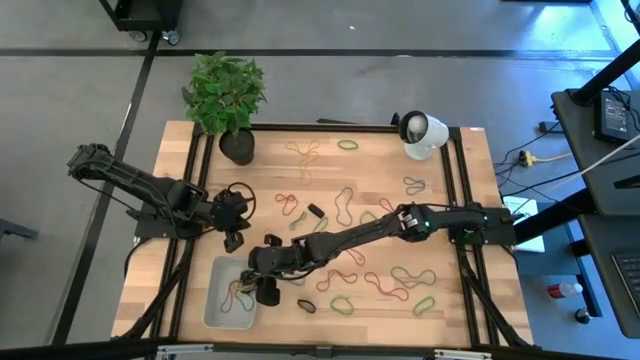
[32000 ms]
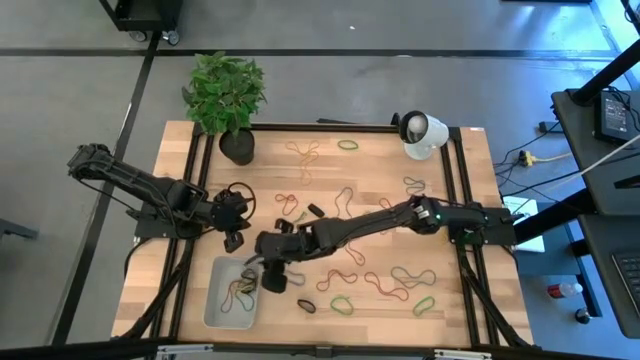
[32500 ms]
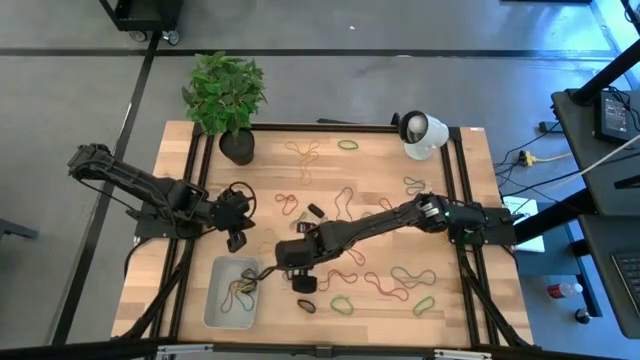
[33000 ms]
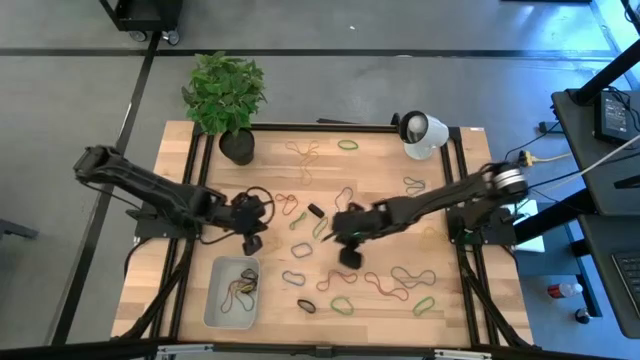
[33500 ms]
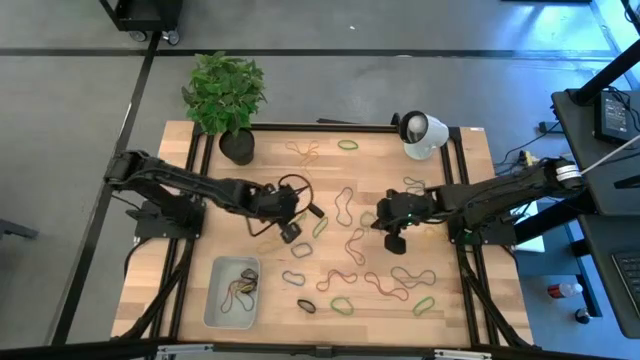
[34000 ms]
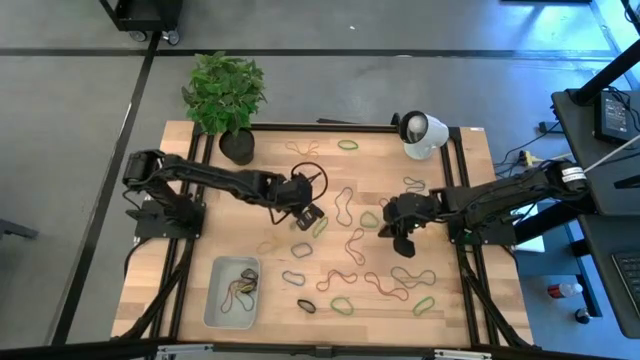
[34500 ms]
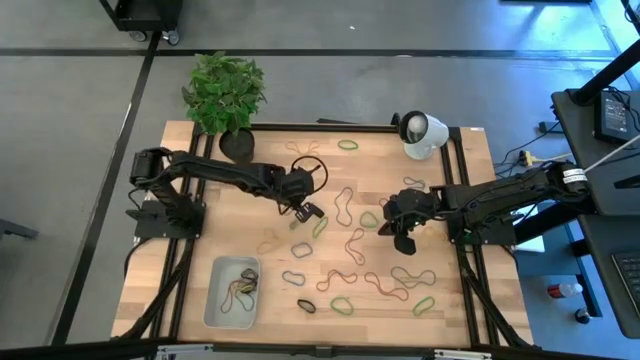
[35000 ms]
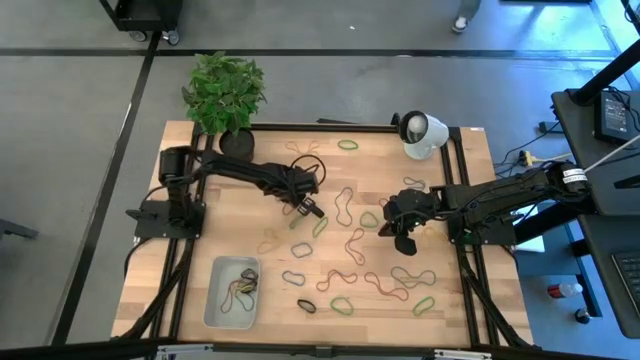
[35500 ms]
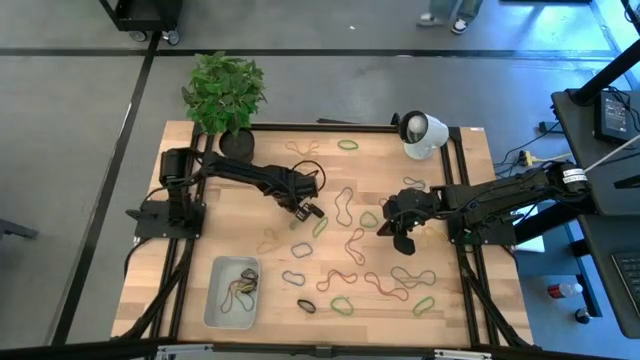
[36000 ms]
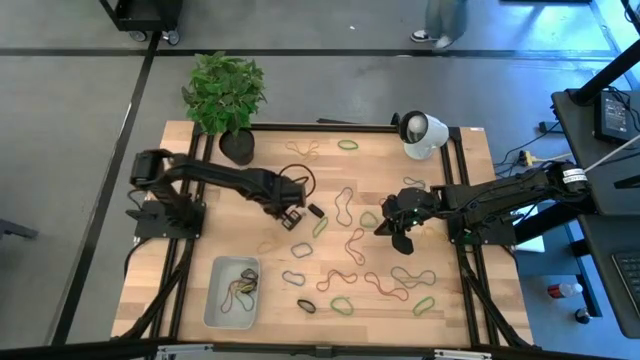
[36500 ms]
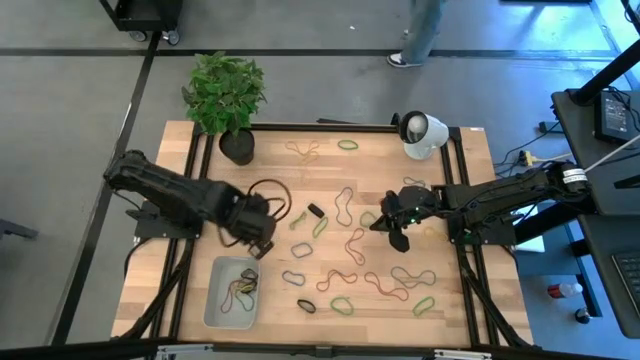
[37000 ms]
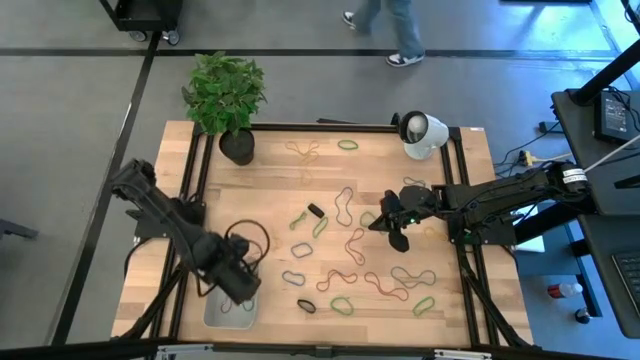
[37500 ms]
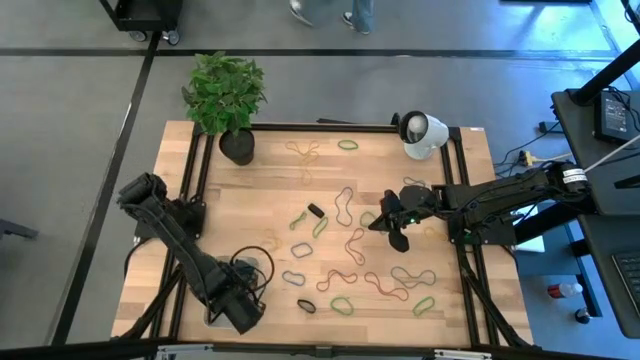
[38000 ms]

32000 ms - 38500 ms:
Task: Pick and place rubber bands into bin
Put the red rubber band into the bin

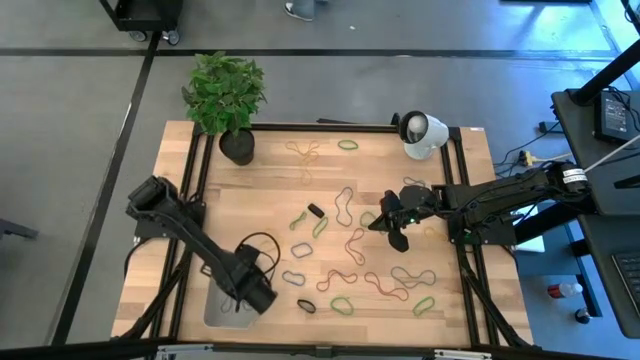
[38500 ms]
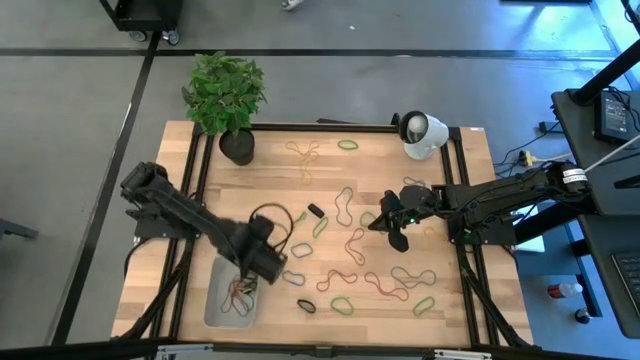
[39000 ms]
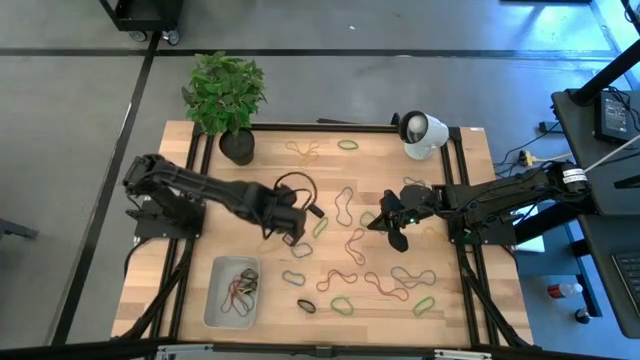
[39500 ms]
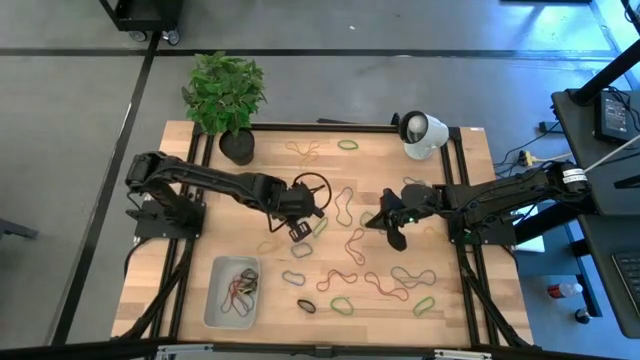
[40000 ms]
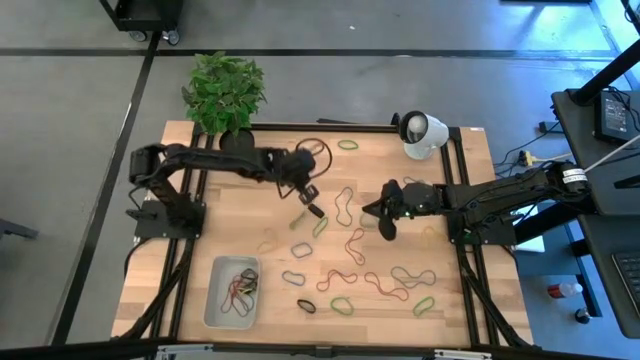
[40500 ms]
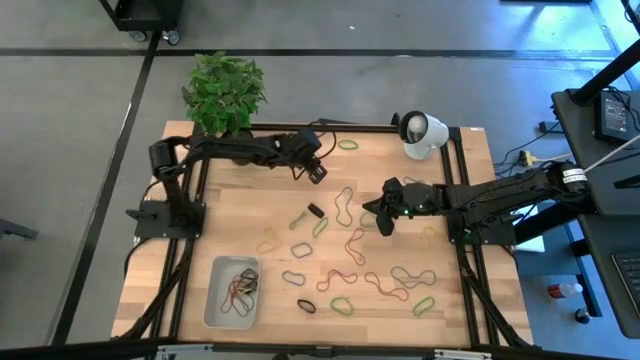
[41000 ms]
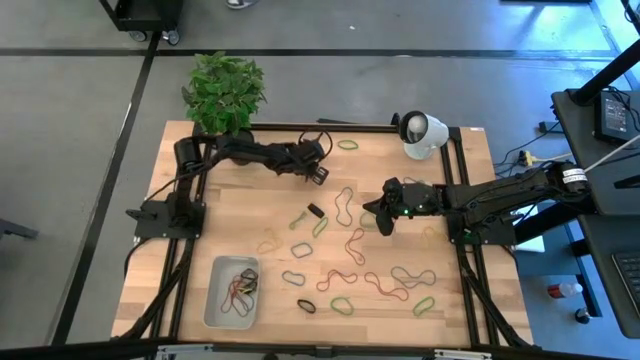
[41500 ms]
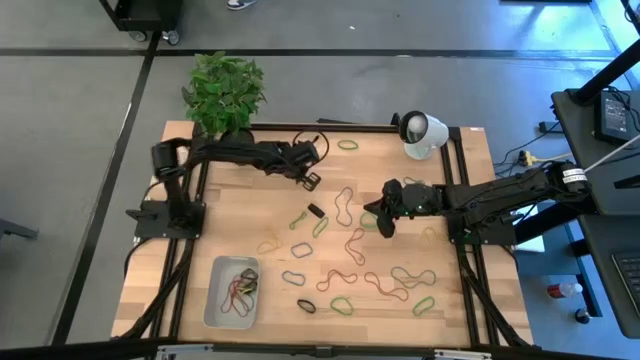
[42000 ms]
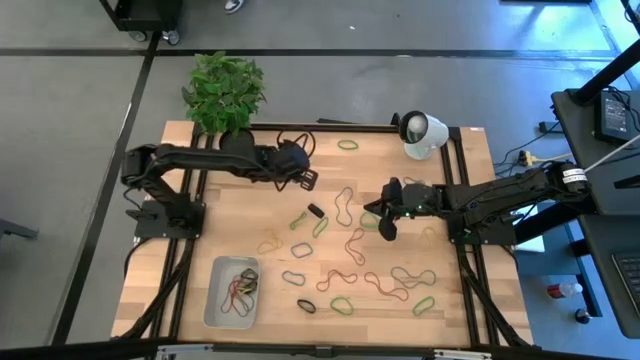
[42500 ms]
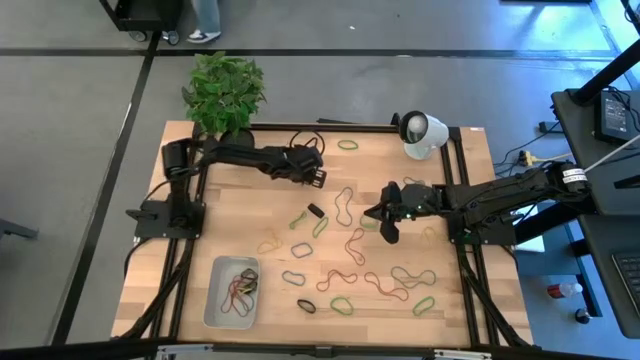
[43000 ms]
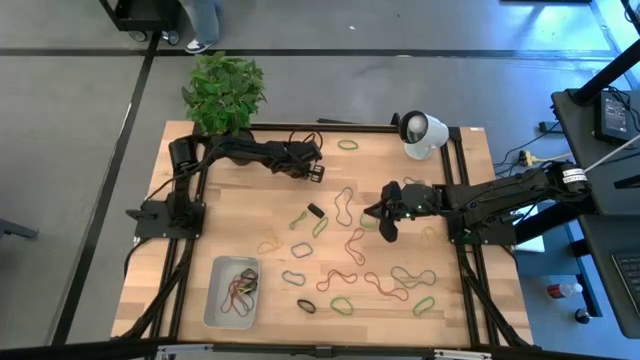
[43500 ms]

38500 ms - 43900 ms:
Put the yellow rubber band into the bin

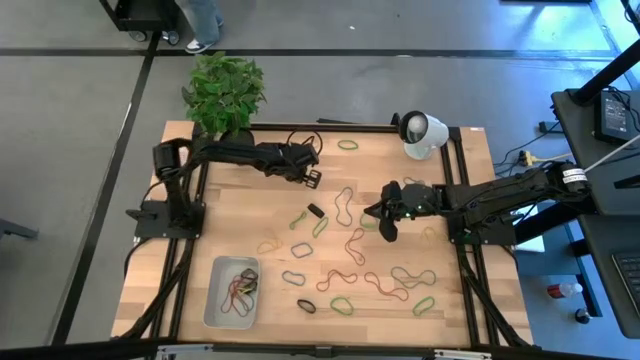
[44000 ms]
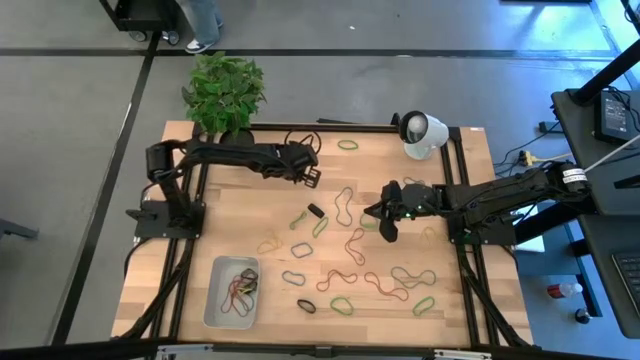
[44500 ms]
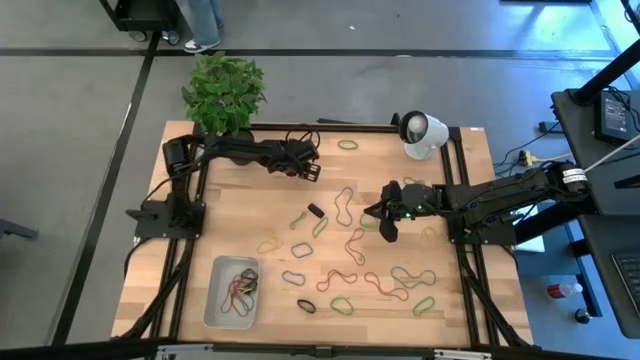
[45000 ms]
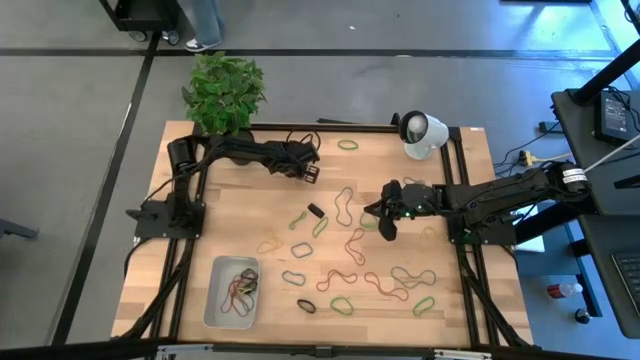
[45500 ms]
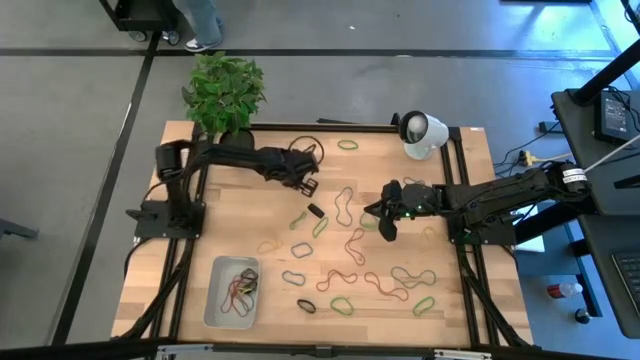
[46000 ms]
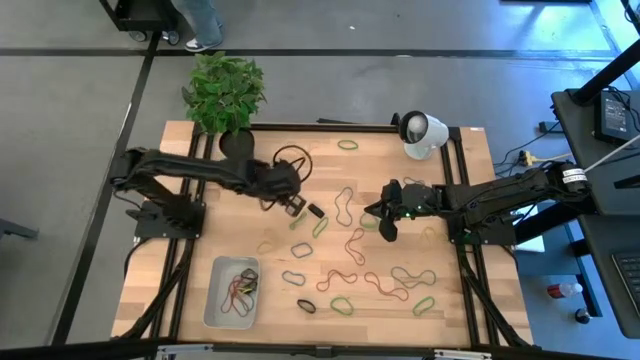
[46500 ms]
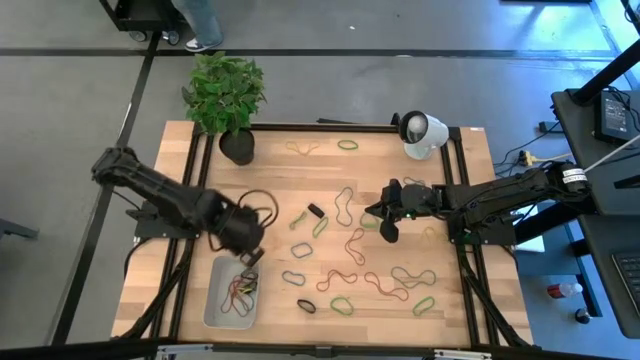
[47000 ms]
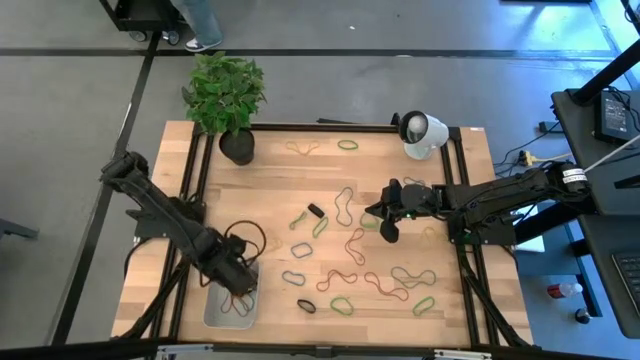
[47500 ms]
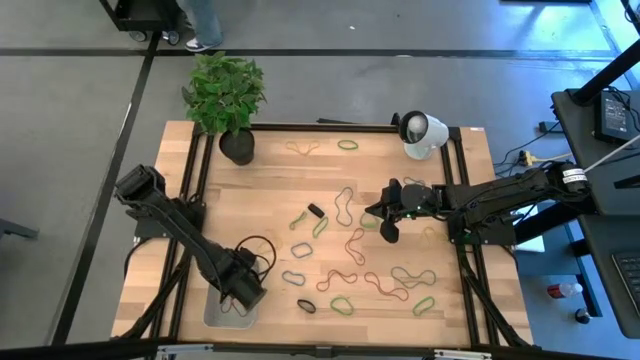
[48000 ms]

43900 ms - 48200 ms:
Put the yellow rubber band into the bin

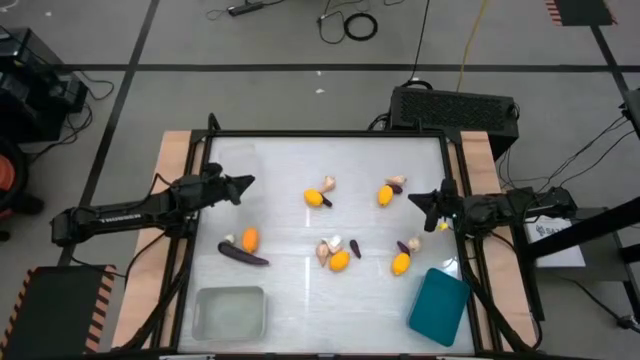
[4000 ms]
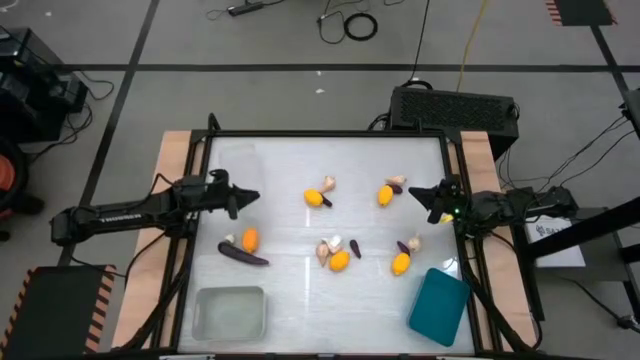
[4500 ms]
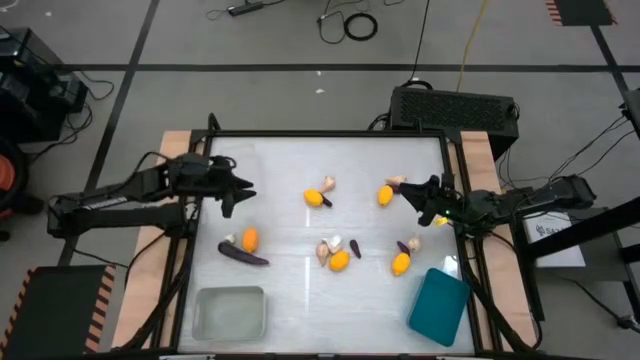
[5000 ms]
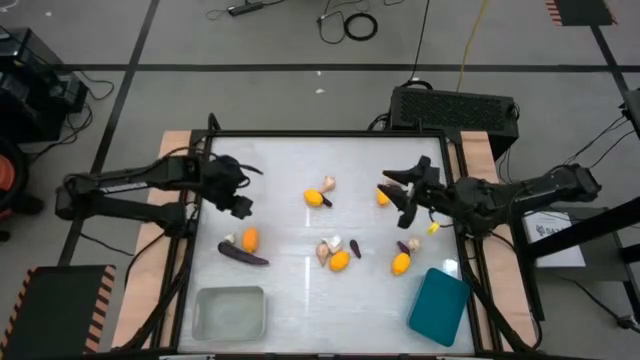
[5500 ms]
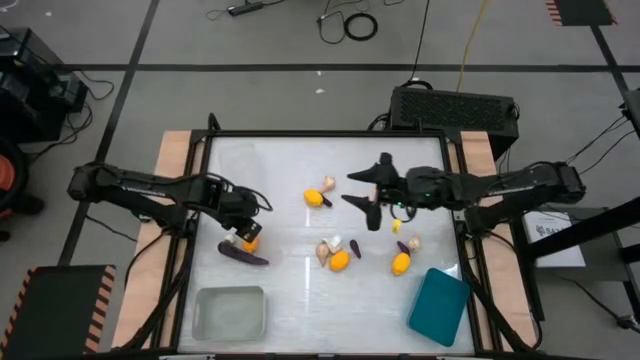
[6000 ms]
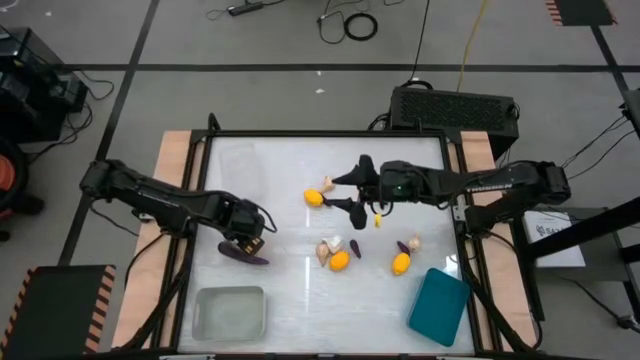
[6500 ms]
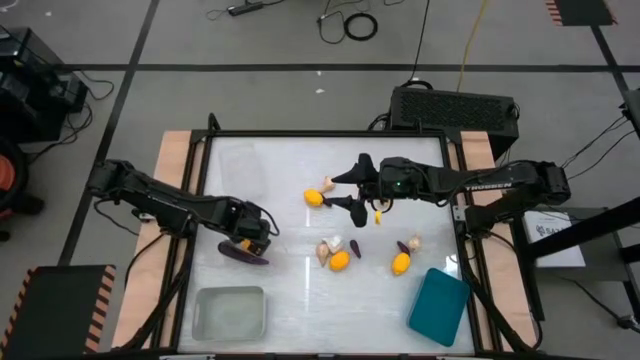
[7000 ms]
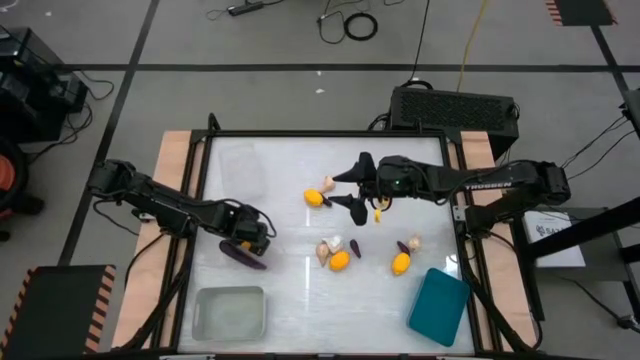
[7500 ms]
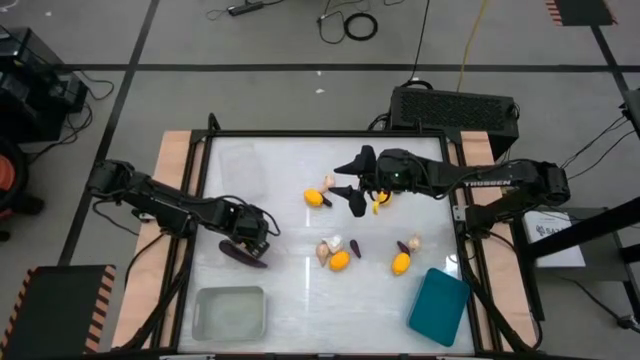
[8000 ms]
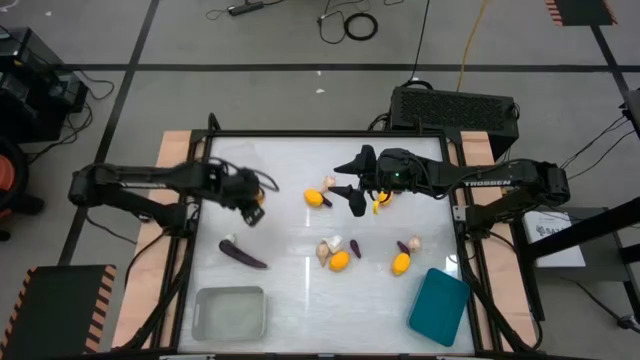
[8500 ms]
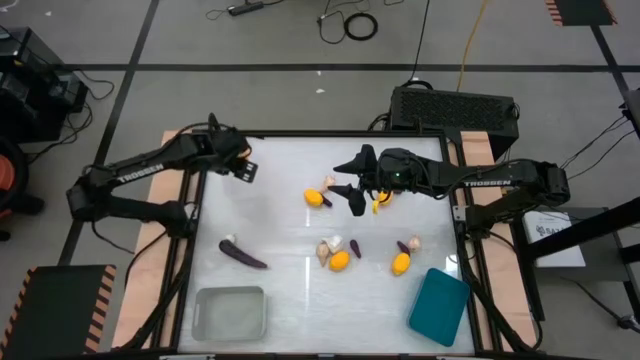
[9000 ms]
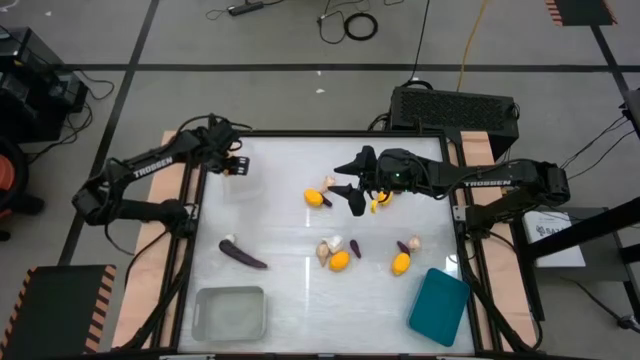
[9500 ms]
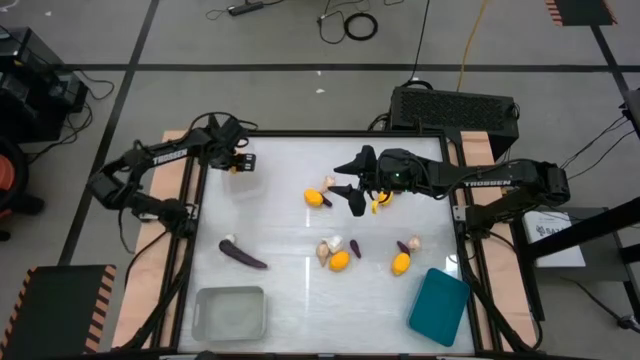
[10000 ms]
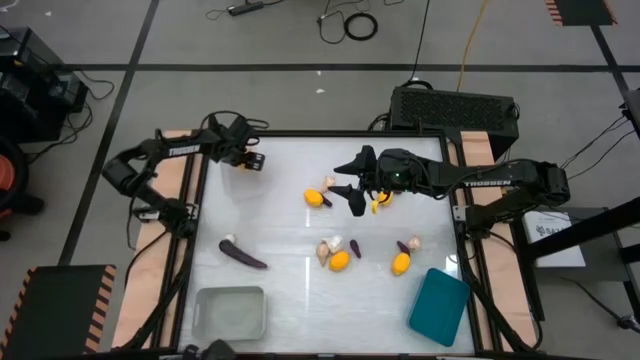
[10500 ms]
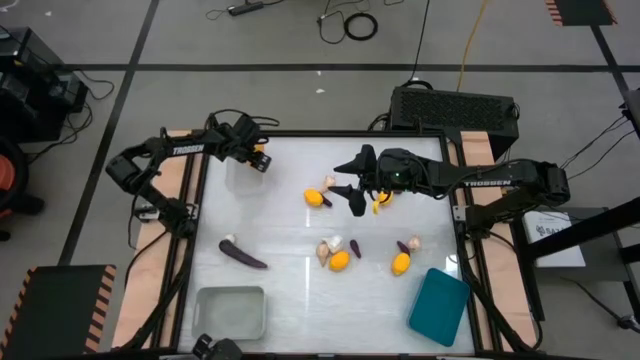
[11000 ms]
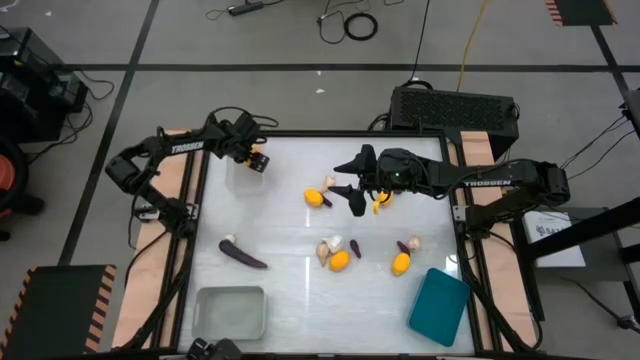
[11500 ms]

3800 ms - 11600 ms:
Task: Sort produce into baskets
Put the yellow lemon into the white bin
